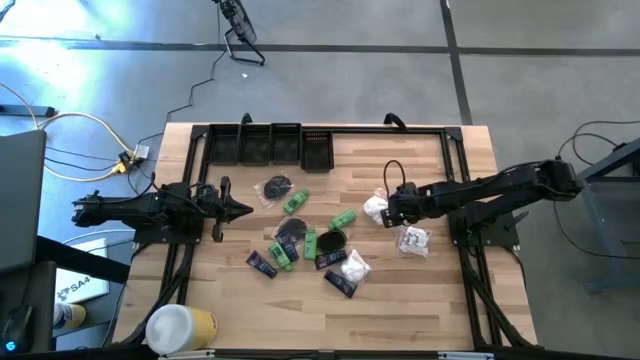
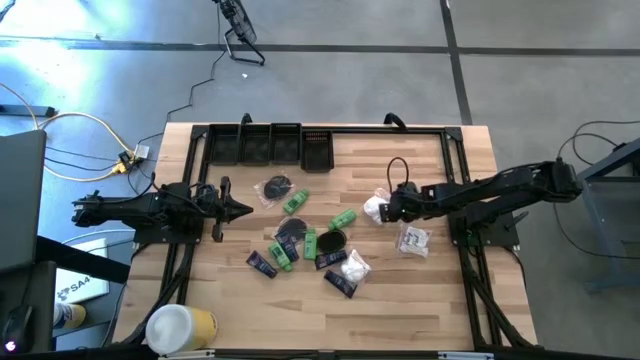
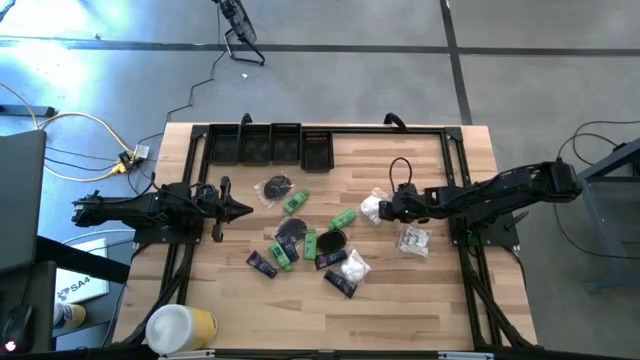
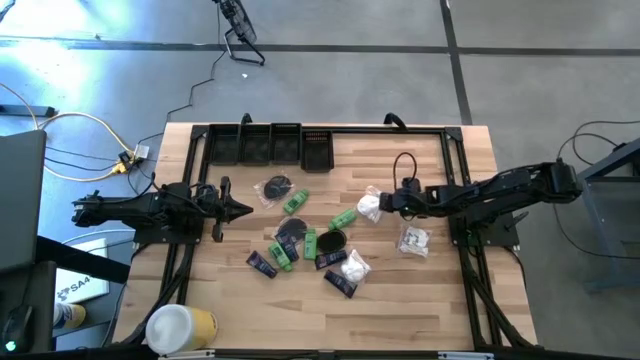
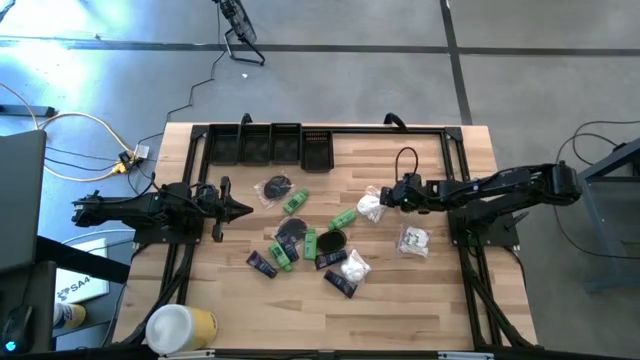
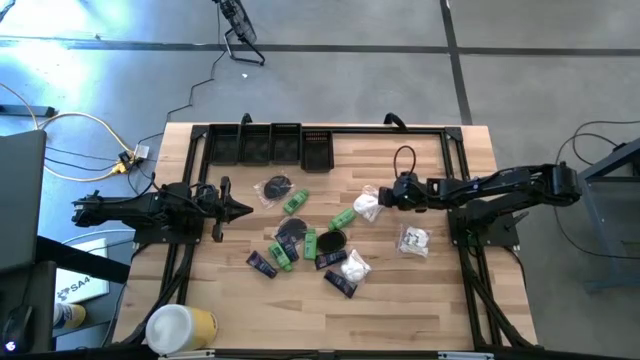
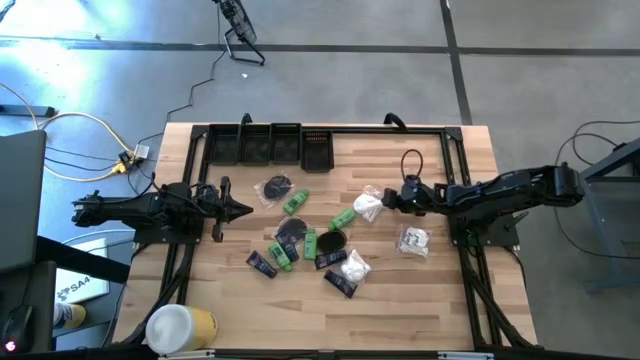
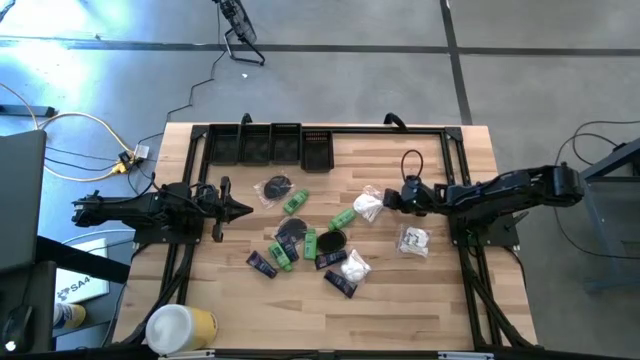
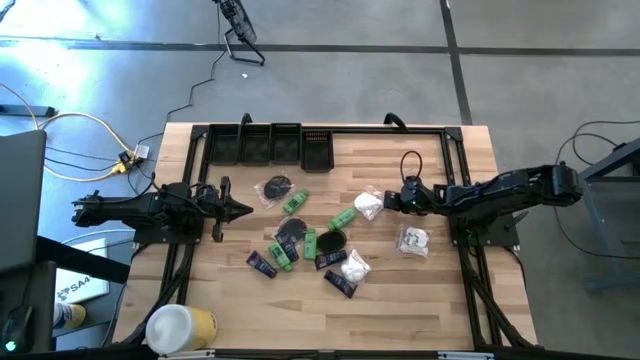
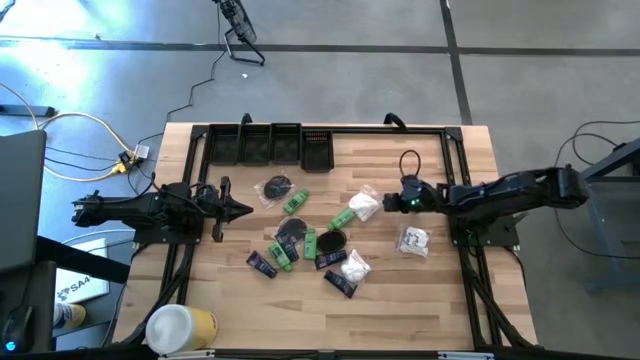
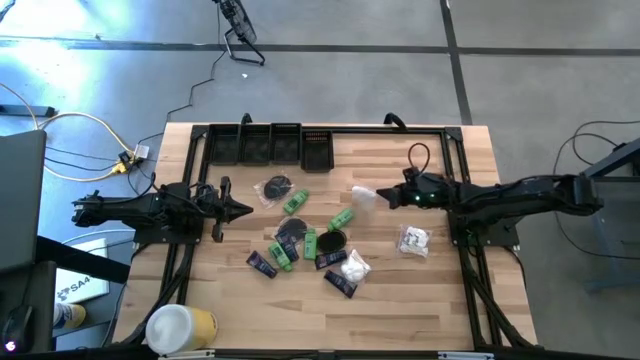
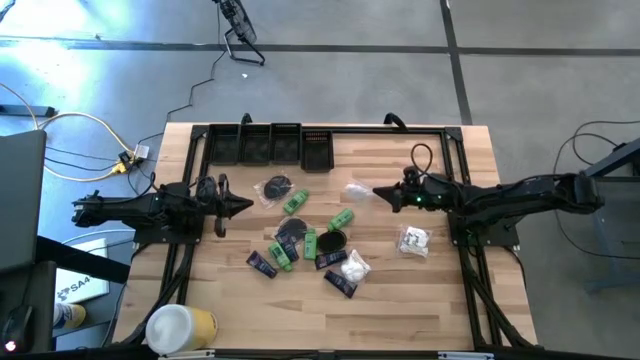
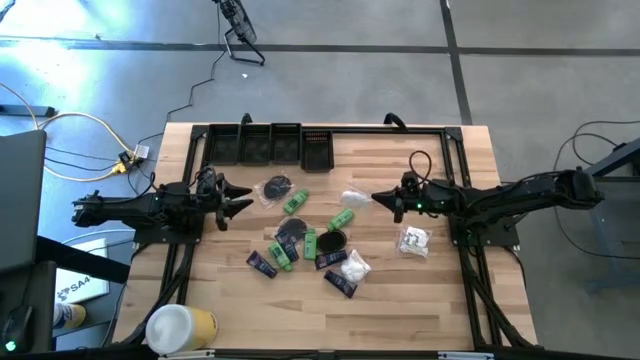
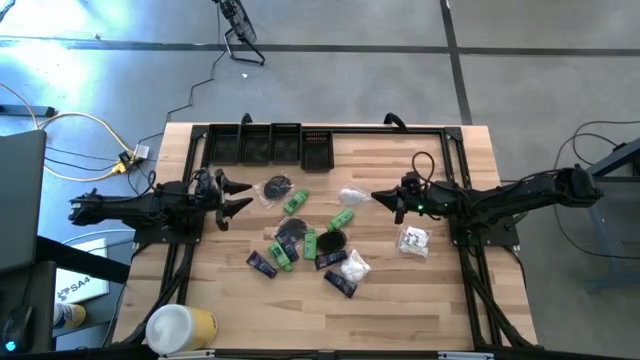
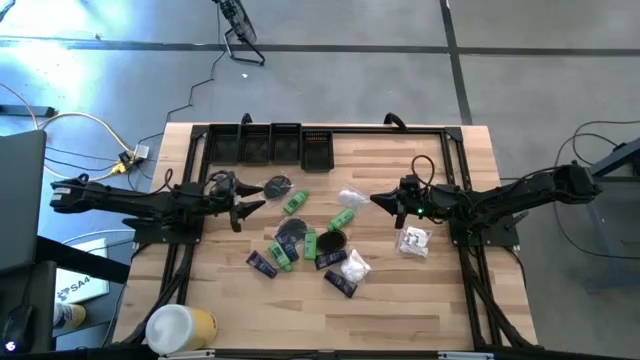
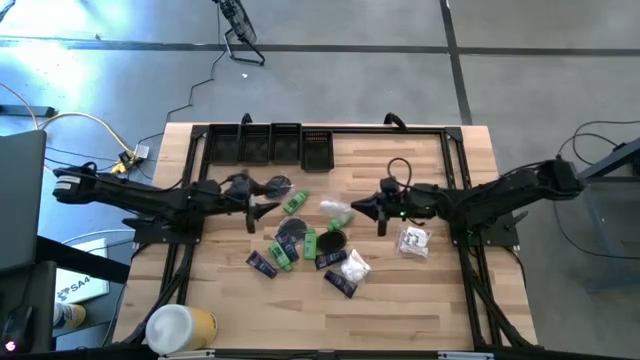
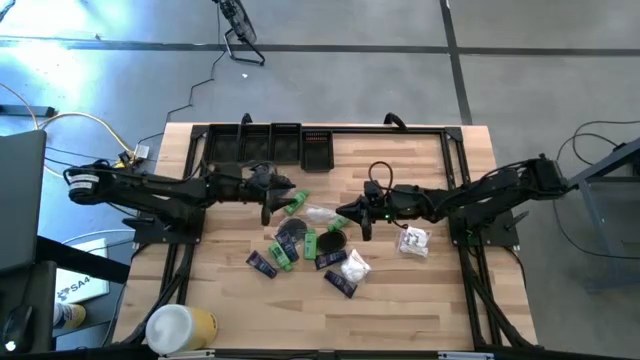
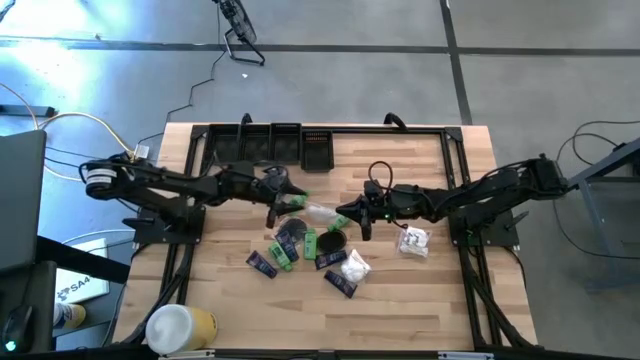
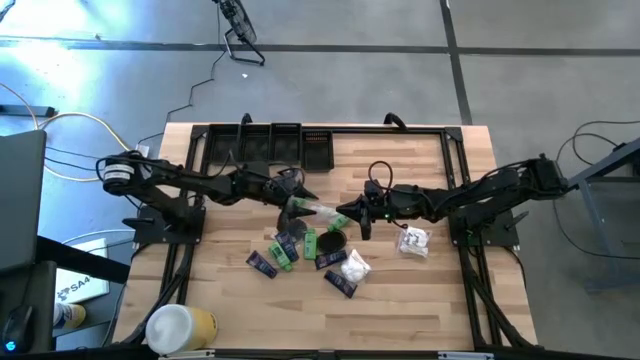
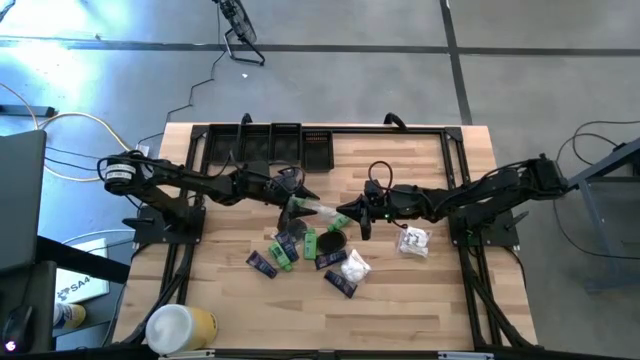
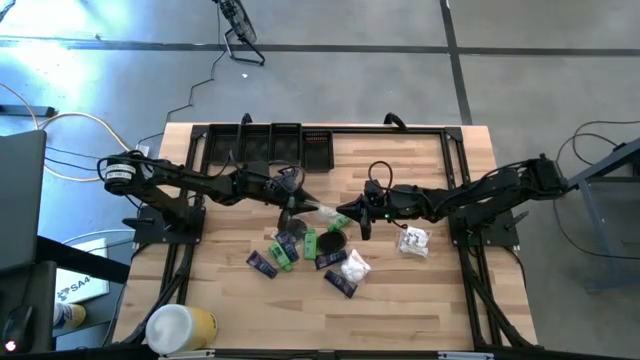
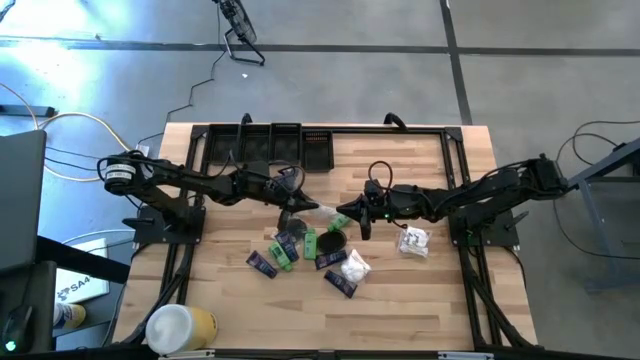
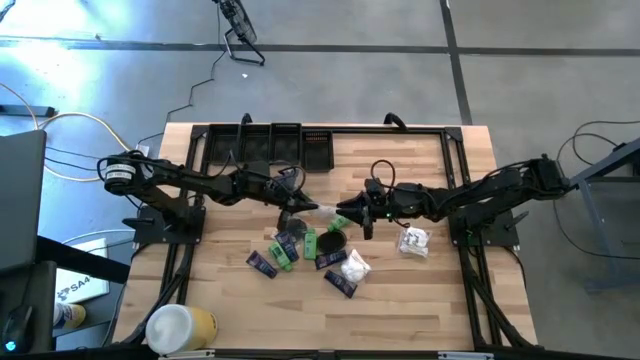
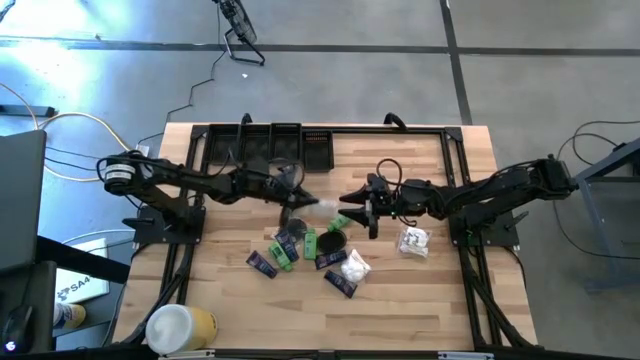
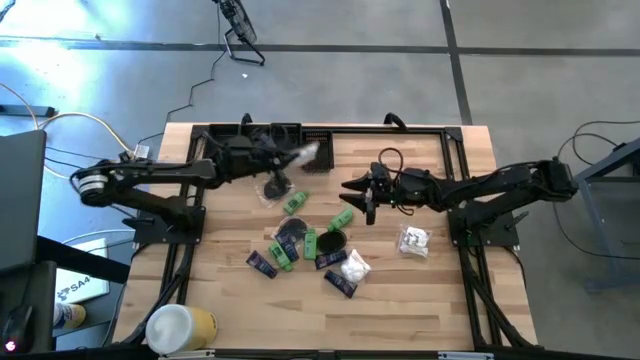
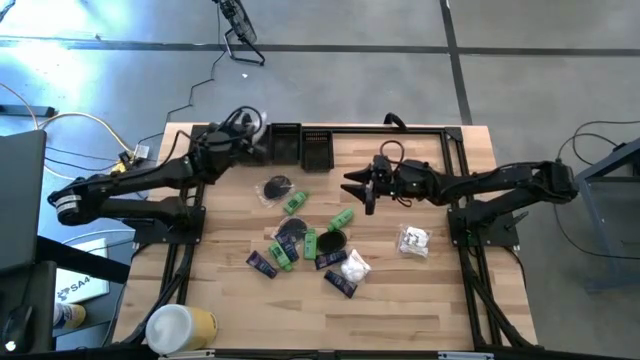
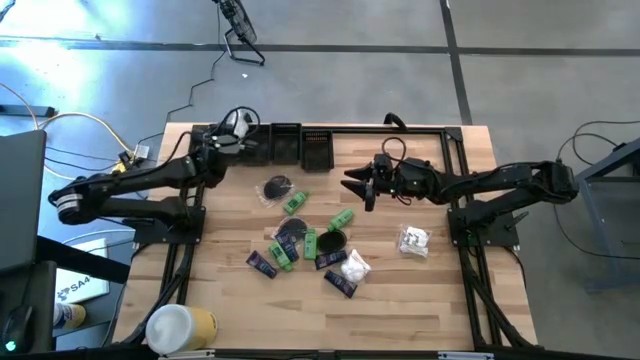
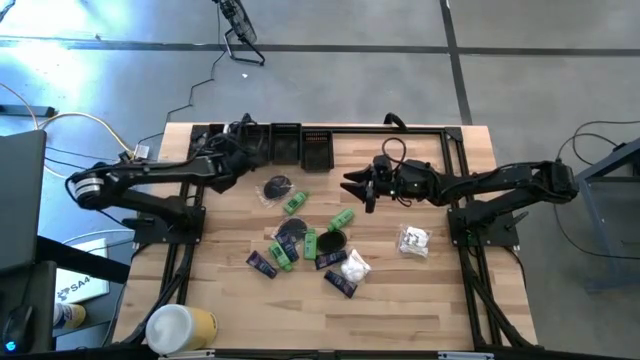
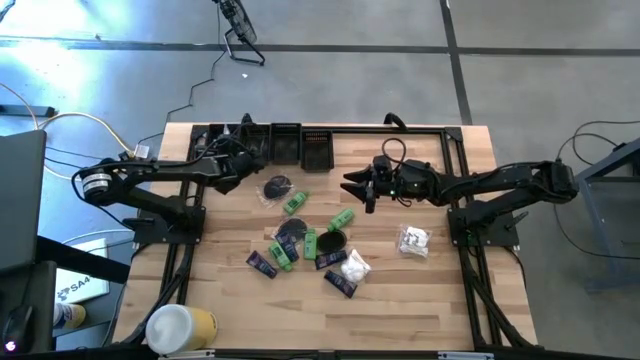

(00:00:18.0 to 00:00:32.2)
Task: Pick & Place Travel size toiletries
Put the cotton pack into the left black bin

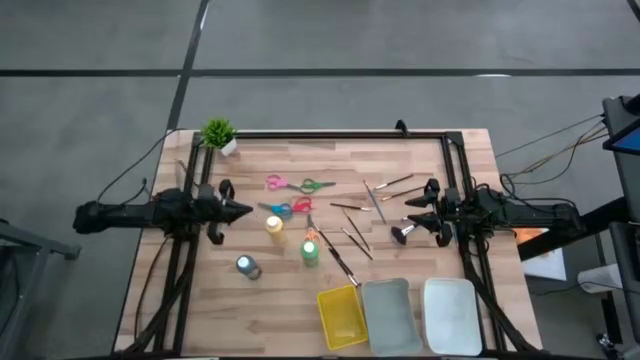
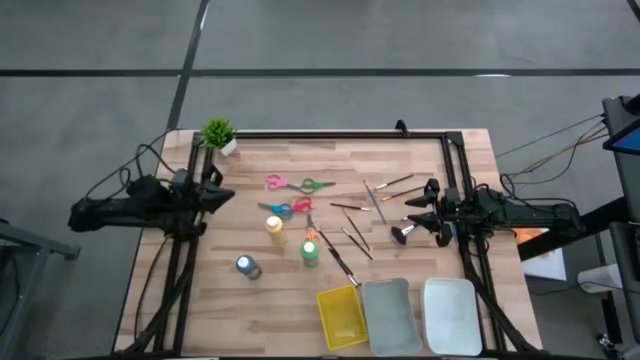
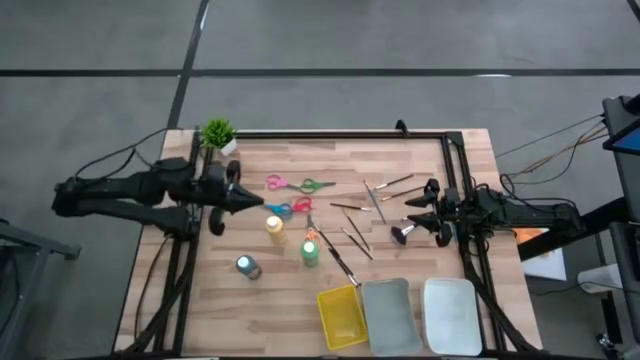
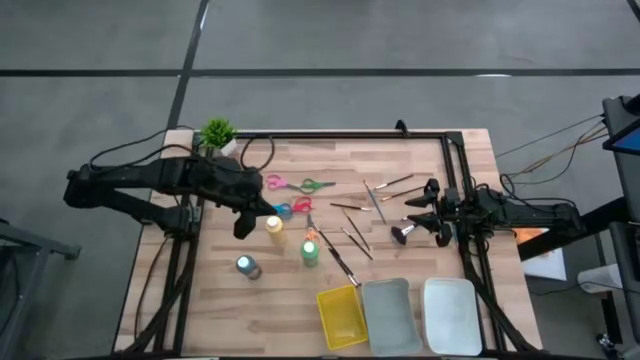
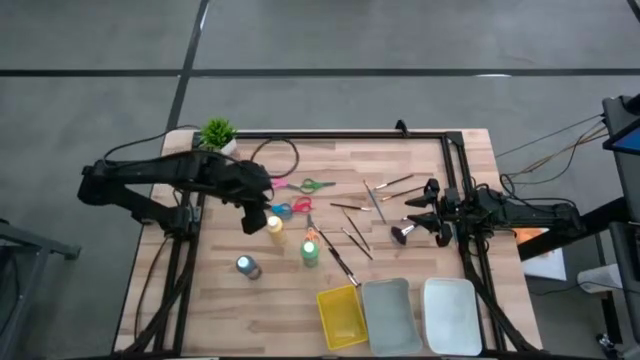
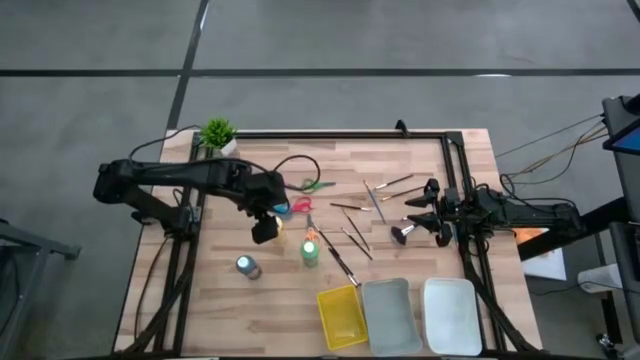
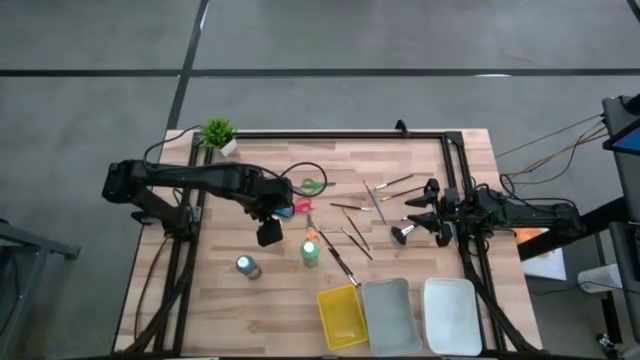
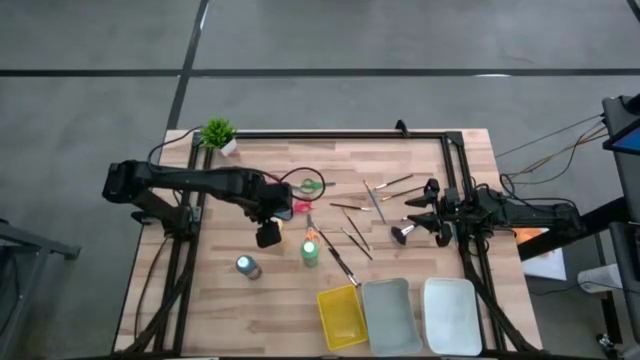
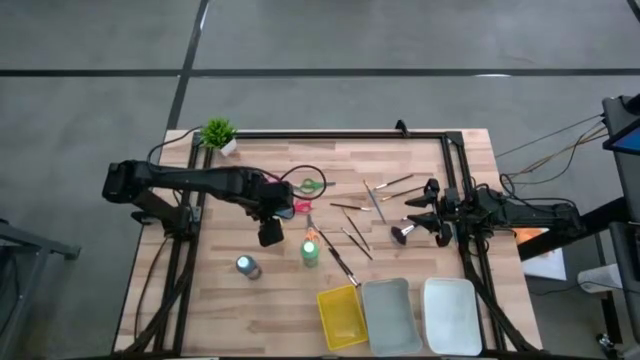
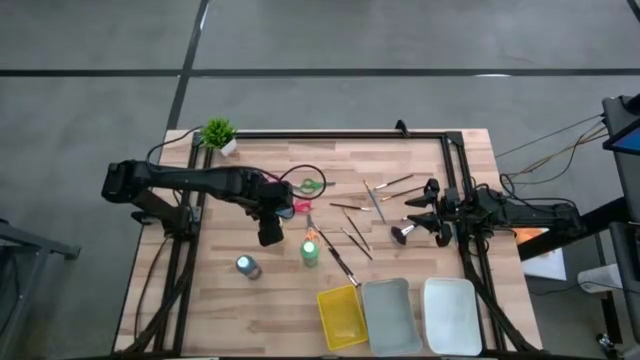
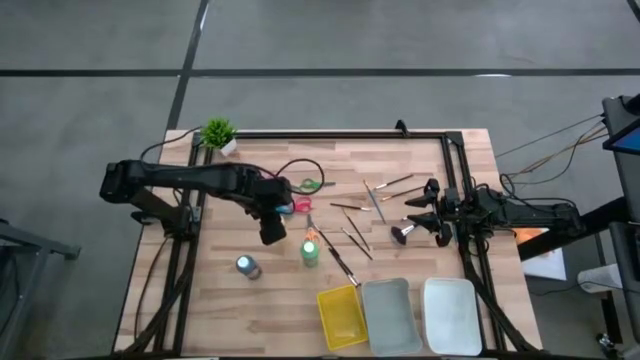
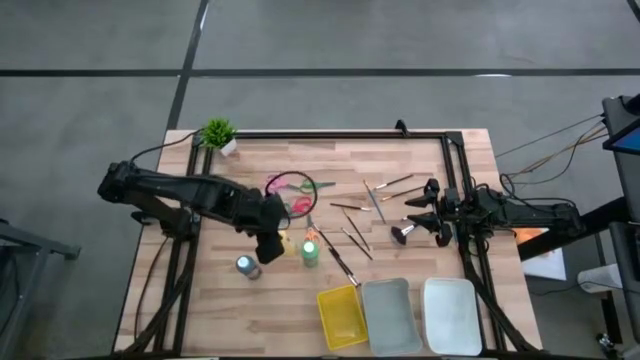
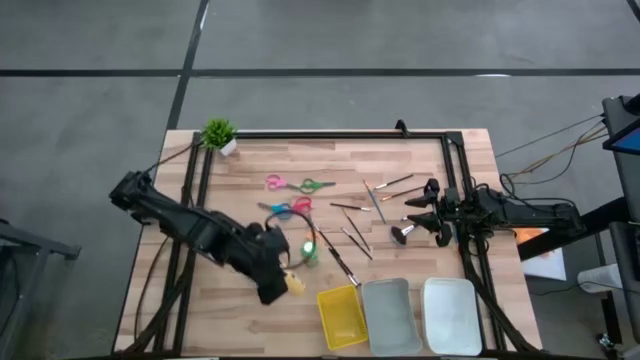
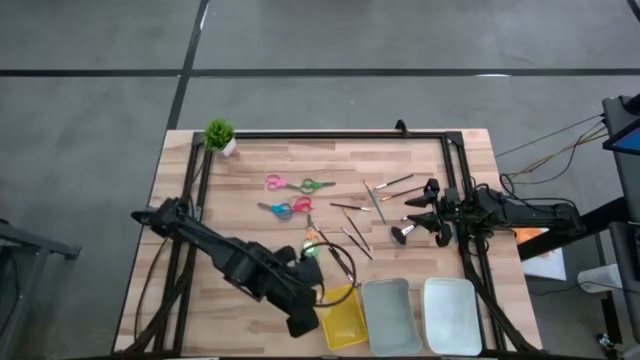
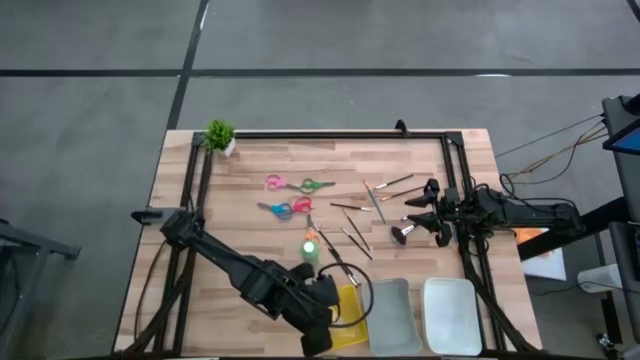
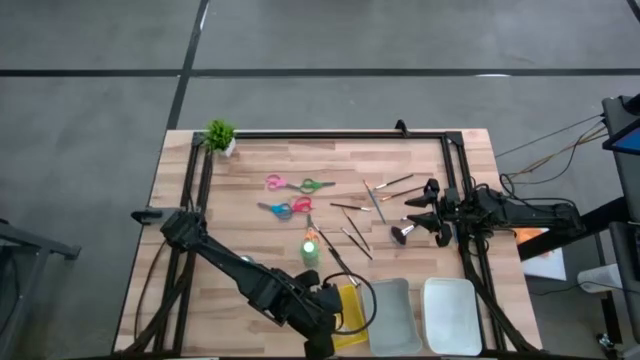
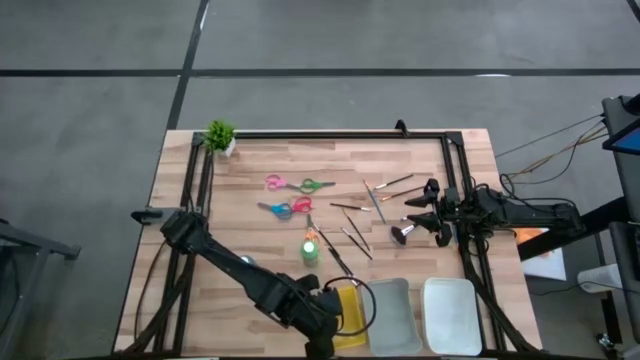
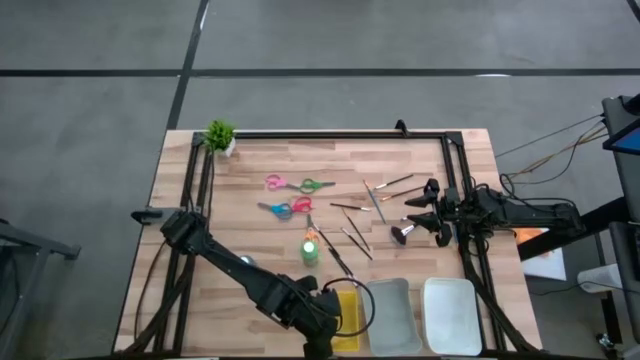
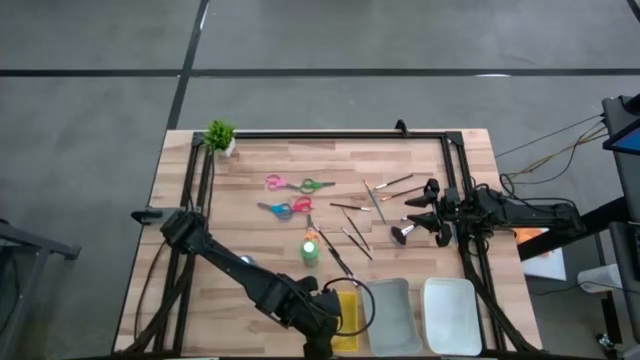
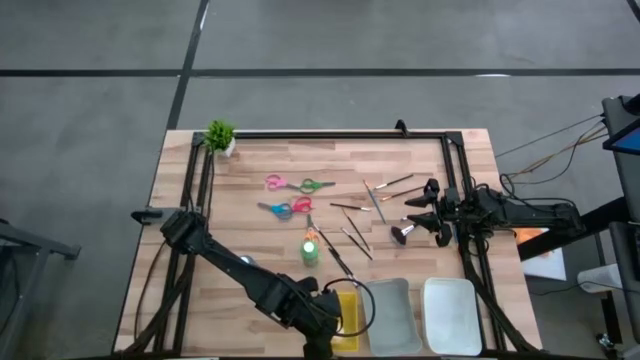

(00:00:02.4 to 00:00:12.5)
Task: Pick & Place Paint Supplies
Put the yellow paint bottle into the yellow bin
